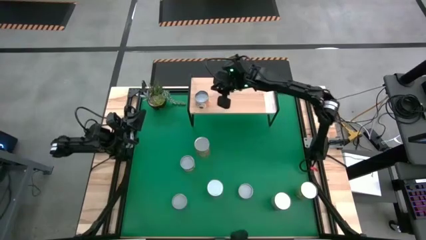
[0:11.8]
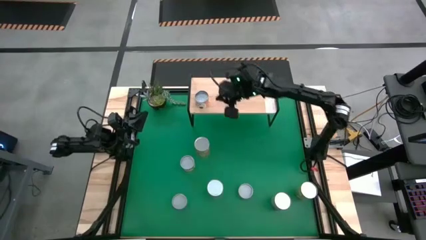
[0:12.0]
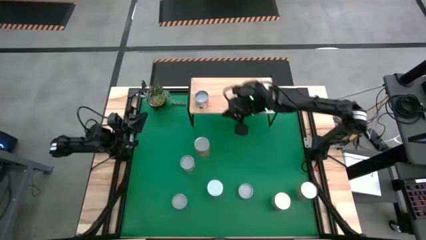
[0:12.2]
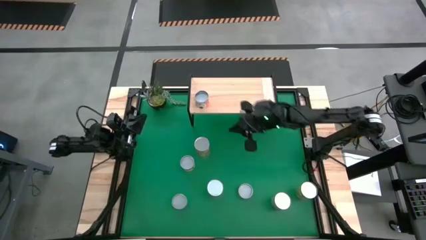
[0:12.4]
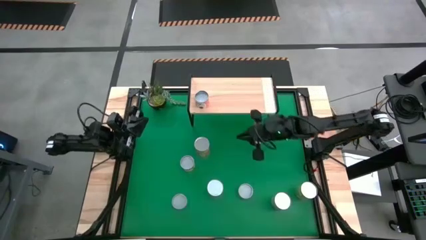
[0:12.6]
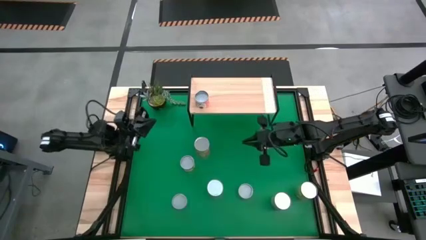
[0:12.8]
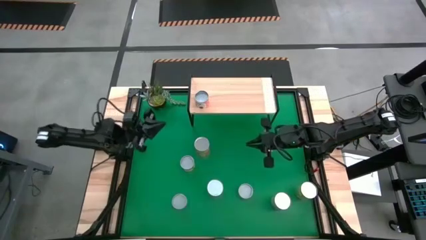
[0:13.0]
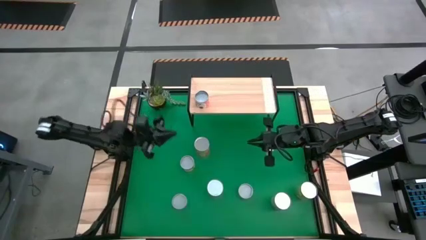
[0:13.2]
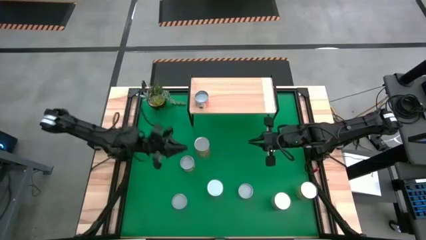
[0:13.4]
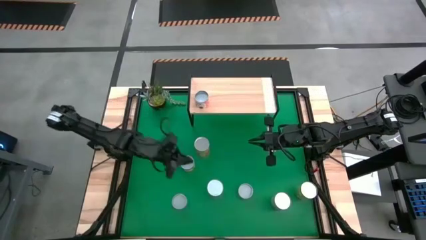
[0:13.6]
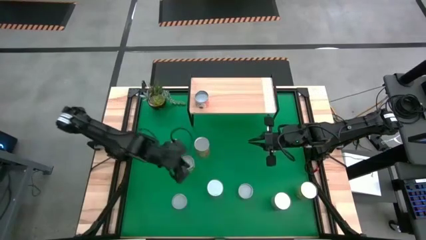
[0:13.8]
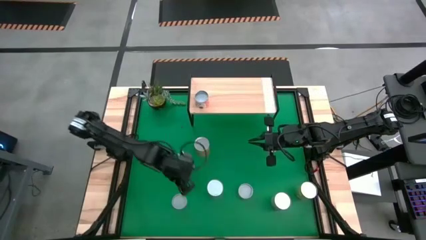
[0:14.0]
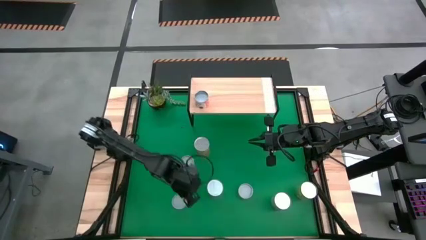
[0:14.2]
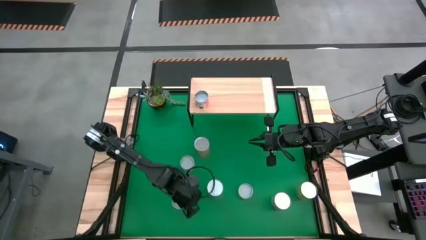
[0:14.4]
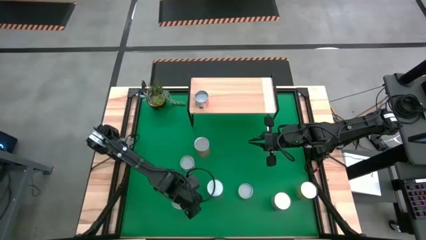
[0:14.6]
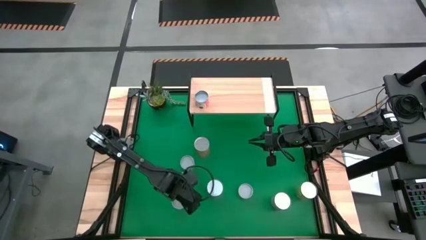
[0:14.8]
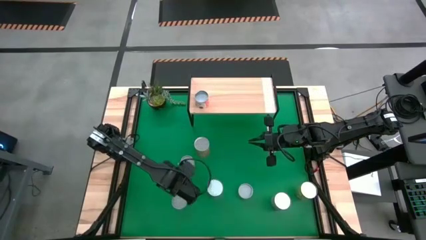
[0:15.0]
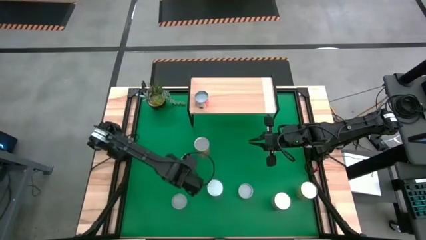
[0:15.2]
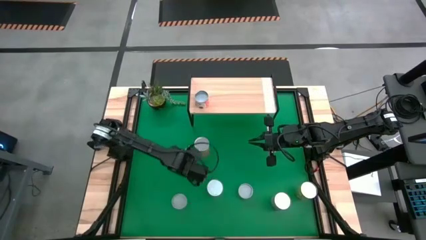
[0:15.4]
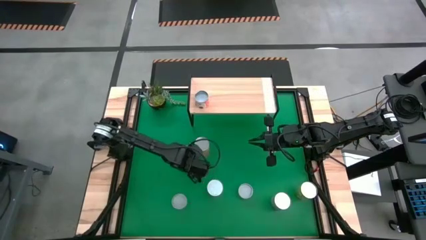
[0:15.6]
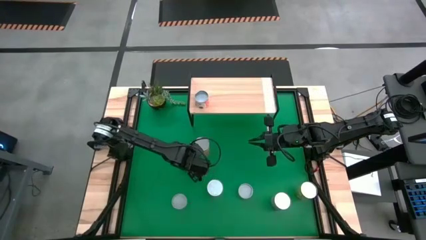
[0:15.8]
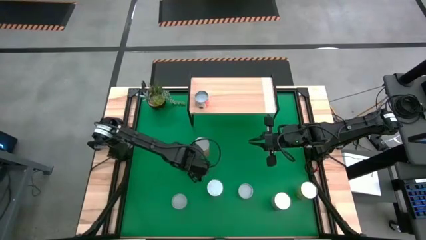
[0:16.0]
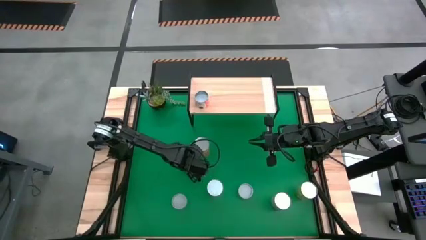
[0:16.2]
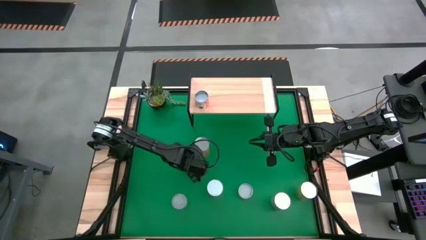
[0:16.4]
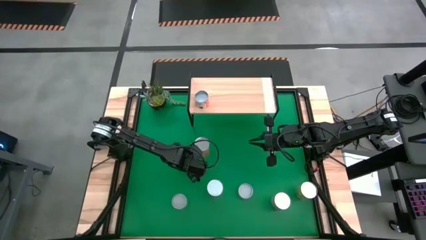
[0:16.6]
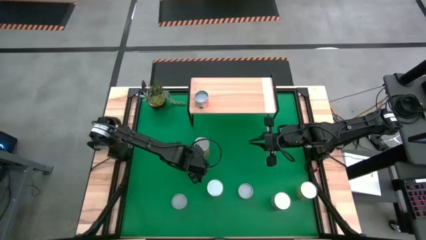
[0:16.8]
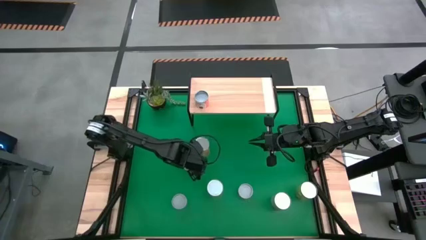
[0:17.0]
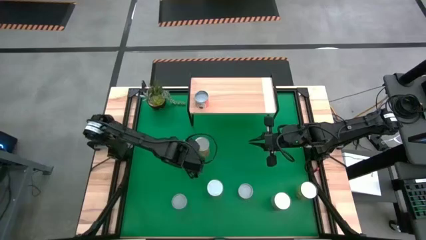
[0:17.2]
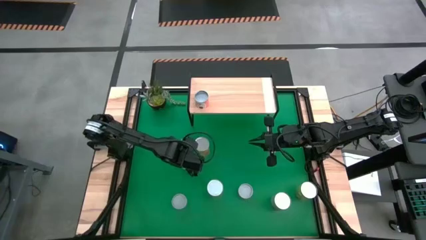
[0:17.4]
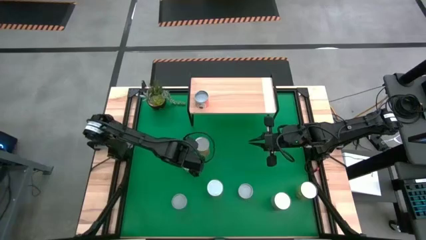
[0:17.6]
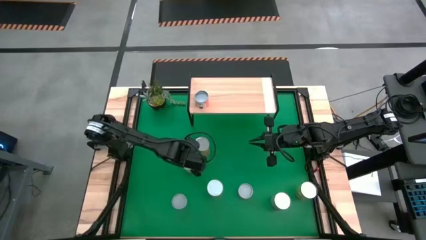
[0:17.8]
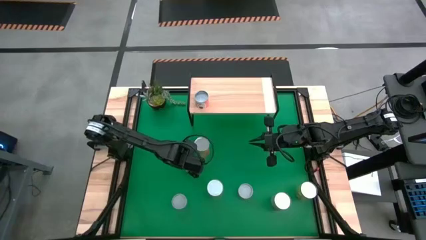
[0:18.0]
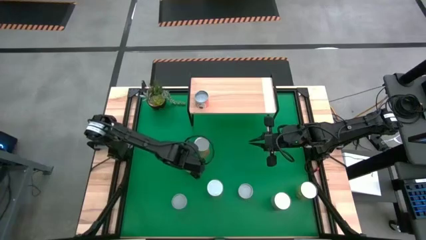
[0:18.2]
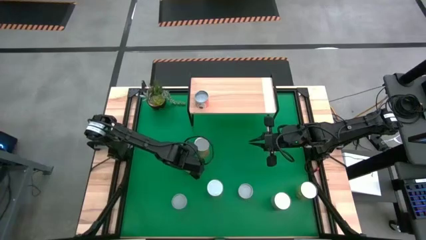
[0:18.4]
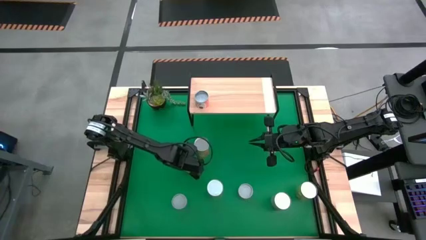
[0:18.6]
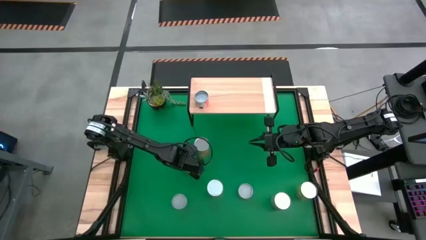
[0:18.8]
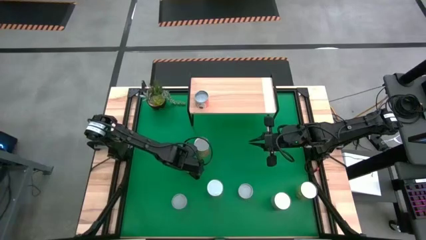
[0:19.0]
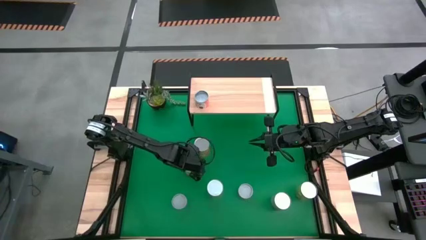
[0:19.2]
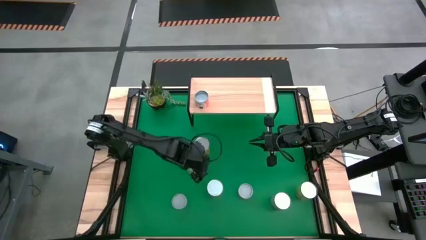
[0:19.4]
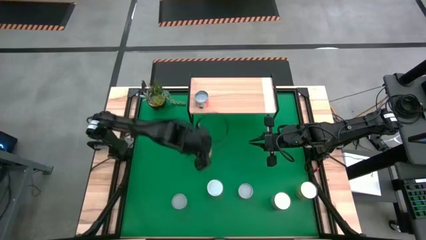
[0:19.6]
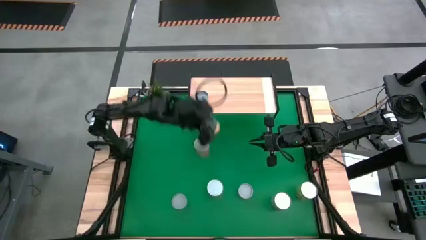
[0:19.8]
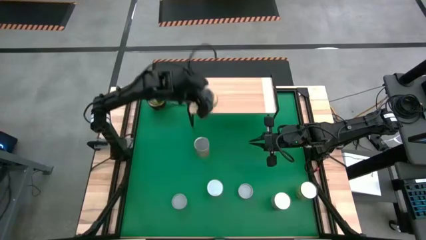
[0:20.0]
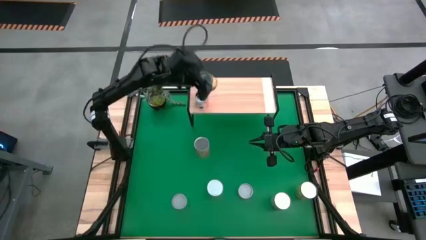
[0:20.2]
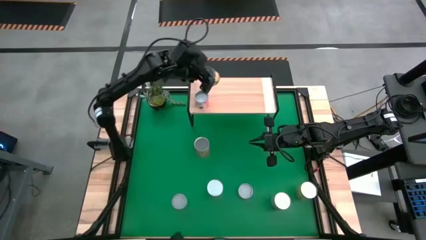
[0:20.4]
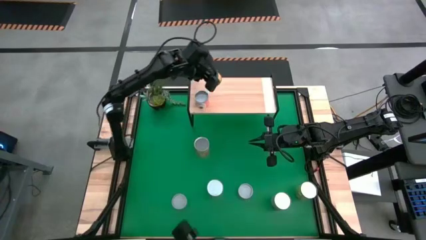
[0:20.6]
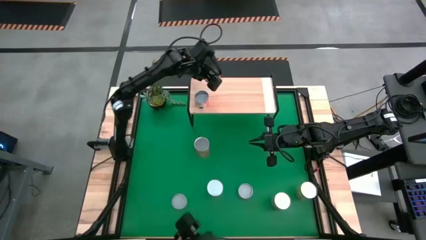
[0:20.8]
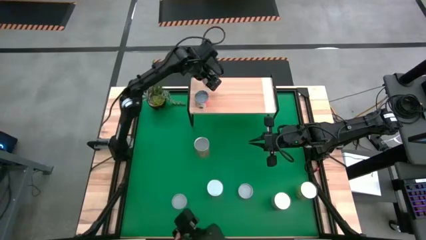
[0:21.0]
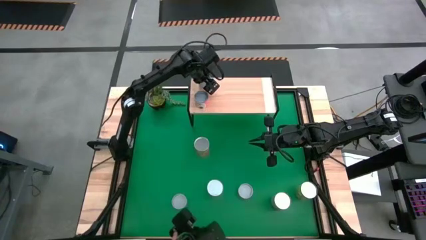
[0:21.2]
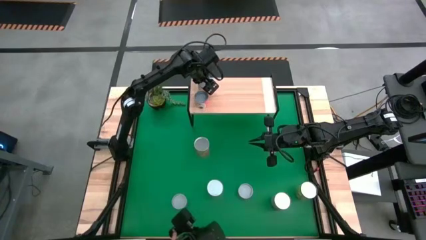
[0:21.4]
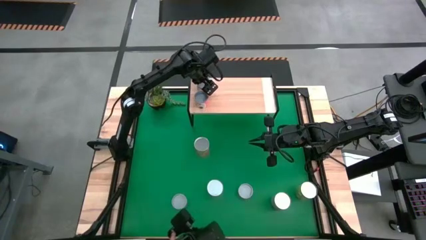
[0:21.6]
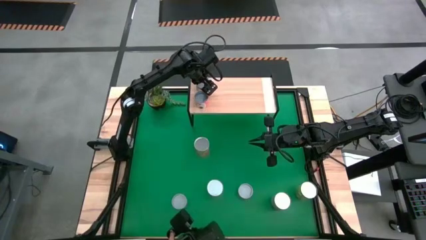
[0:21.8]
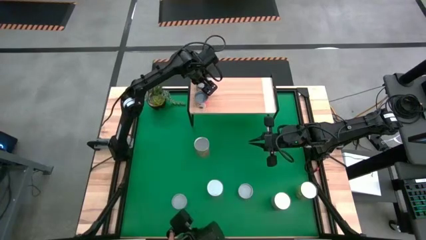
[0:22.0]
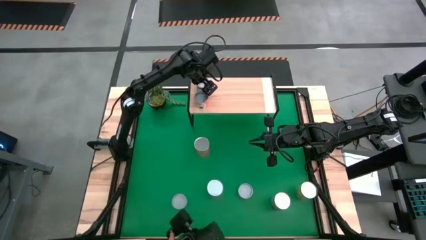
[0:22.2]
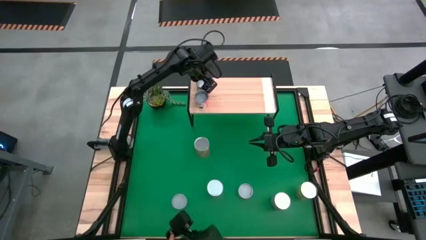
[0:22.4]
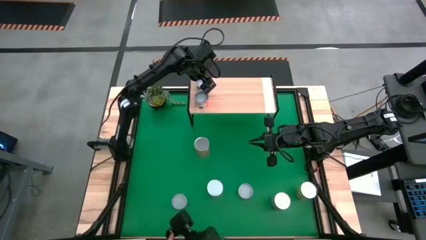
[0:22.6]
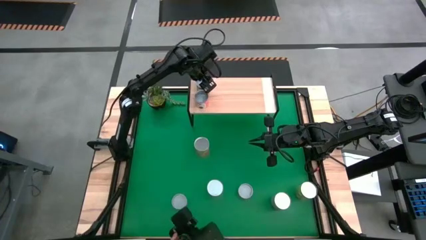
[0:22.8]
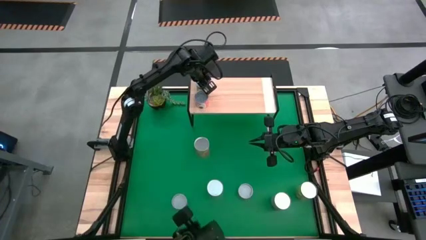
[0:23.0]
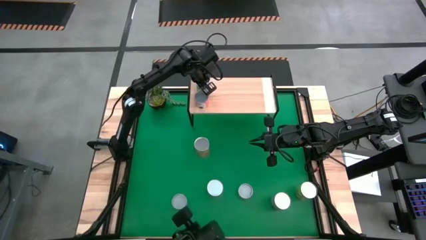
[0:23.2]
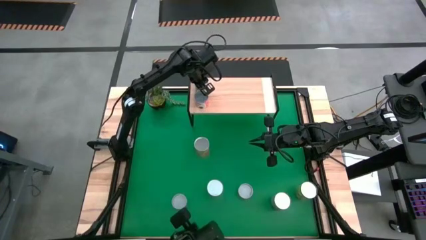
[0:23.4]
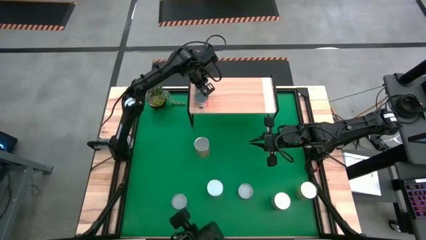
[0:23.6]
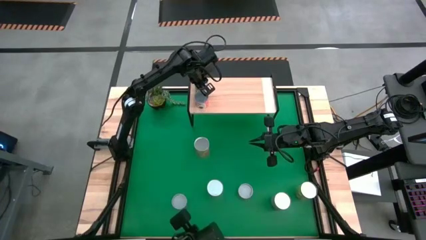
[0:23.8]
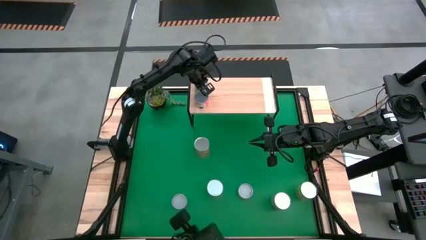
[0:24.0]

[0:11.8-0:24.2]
Task: Pick and place cans onto a shelf
Put the canned peach on the shelf

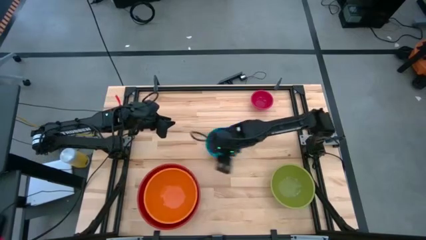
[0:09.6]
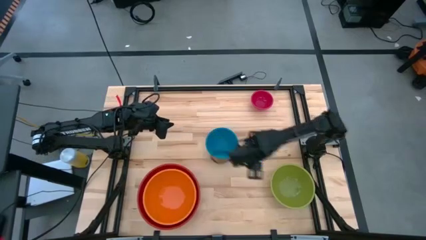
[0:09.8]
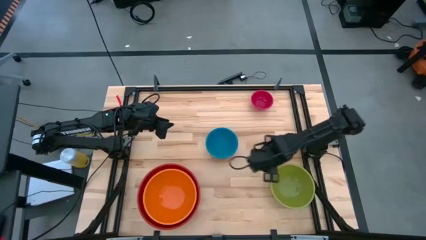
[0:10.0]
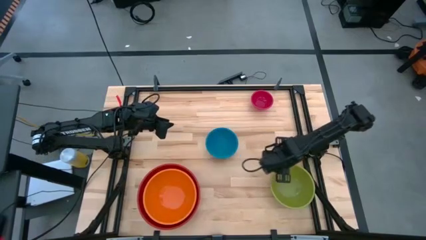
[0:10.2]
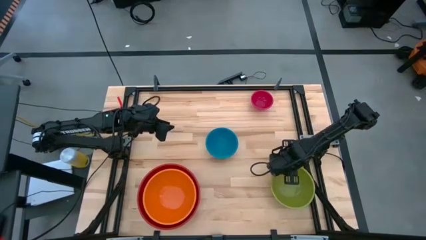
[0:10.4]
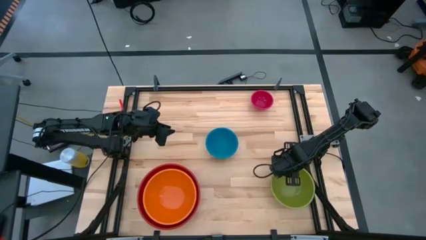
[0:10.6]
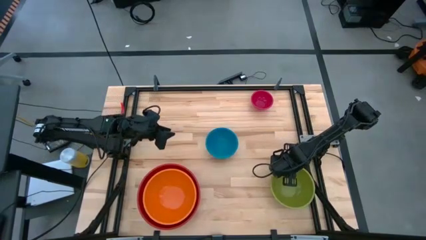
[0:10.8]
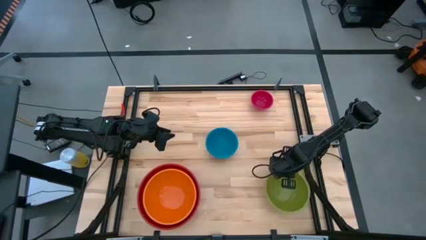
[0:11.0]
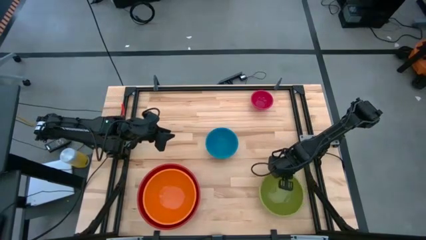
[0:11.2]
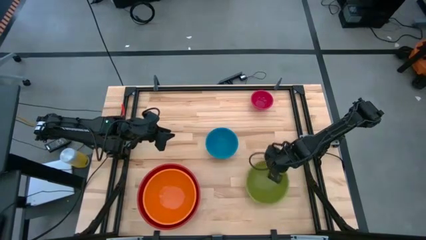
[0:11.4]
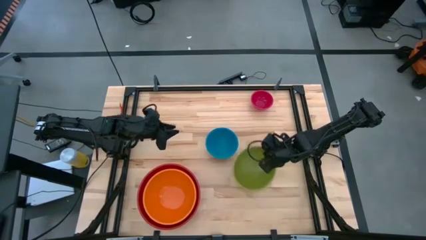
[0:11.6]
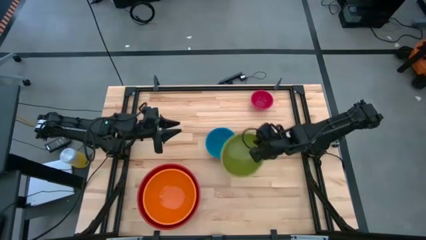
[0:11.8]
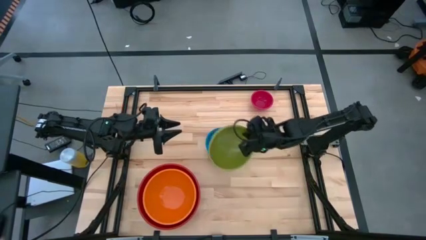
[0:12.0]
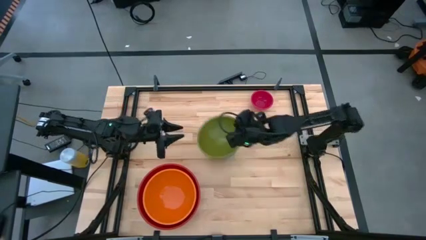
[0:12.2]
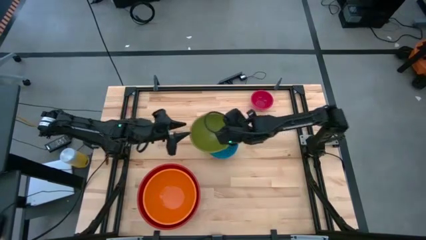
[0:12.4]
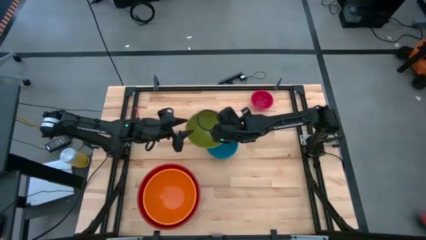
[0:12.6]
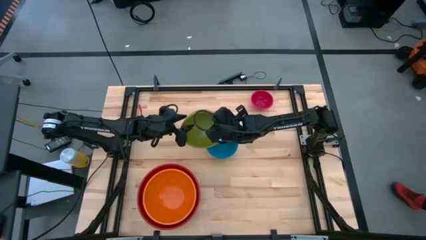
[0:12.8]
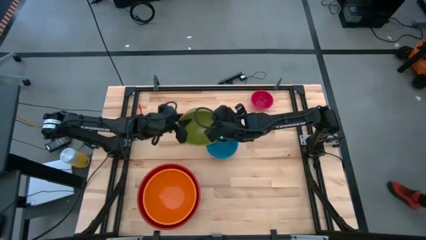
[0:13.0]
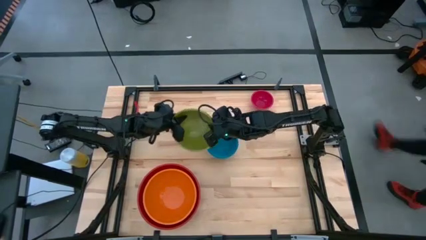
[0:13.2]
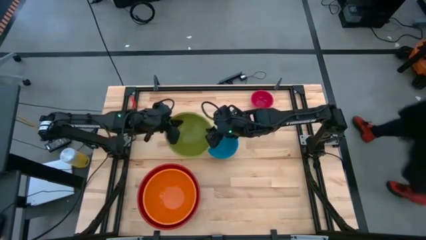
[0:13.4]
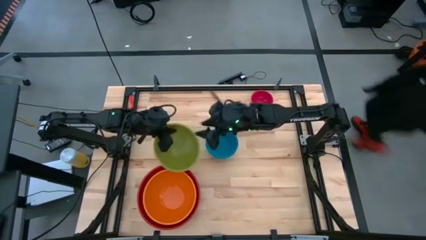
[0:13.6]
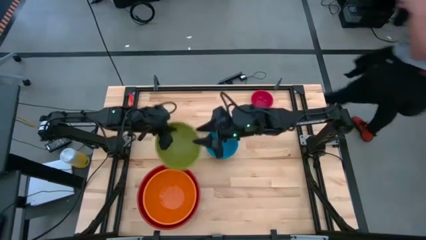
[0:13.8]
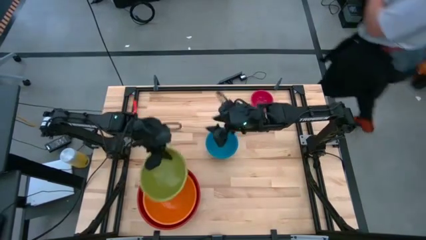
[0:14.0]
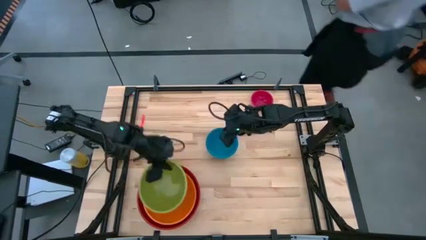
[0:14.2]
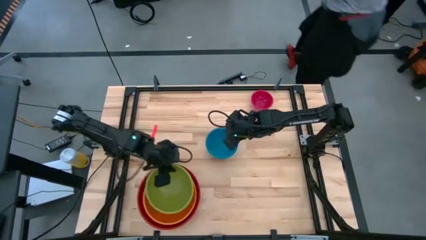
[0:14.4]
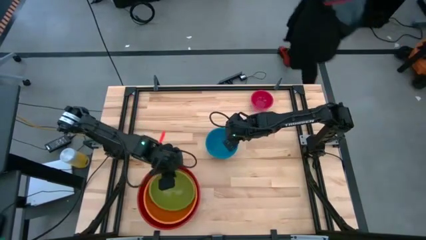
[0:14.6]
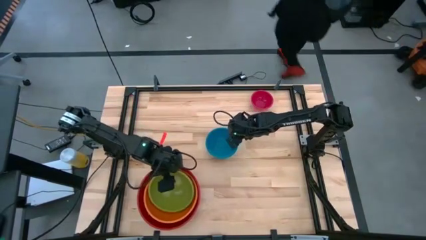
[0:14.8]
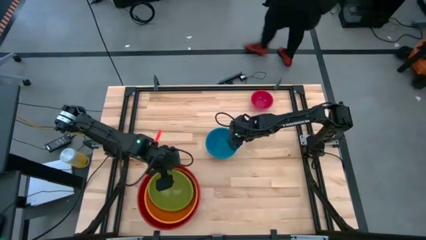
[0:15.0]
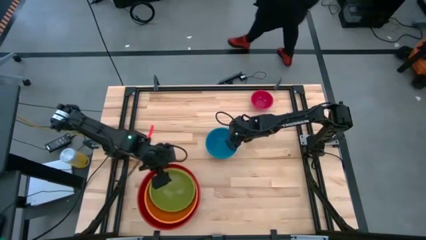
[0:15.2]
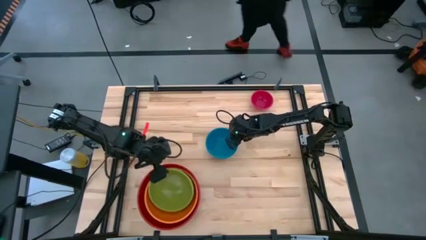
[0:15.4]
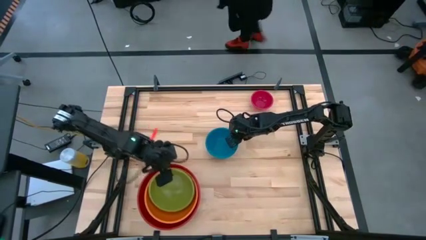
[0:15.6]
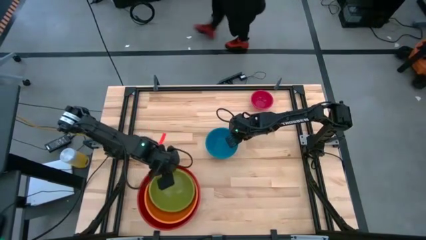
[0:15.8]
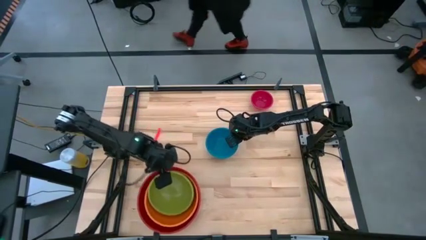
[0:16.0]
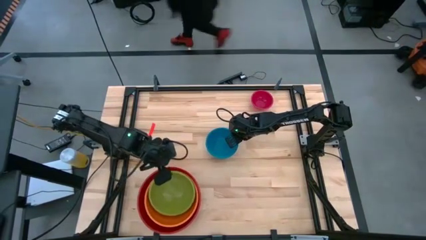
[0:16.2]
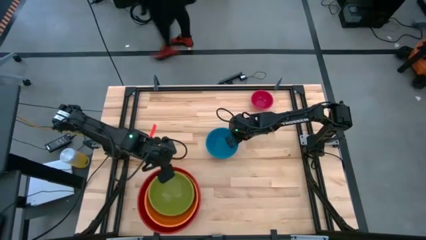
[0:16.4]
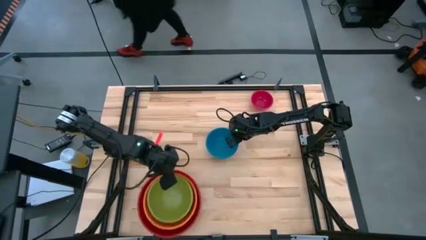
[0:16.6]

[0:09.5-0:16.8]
Task: Nest bowls inside each other by size order
Stack the green bowl on top of the orange bowl
